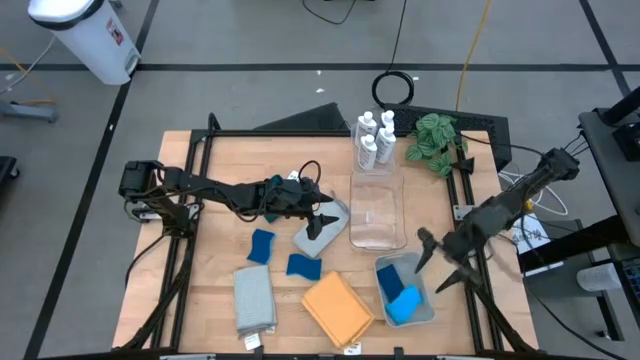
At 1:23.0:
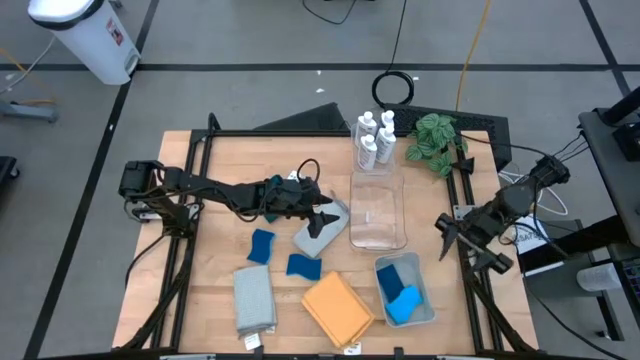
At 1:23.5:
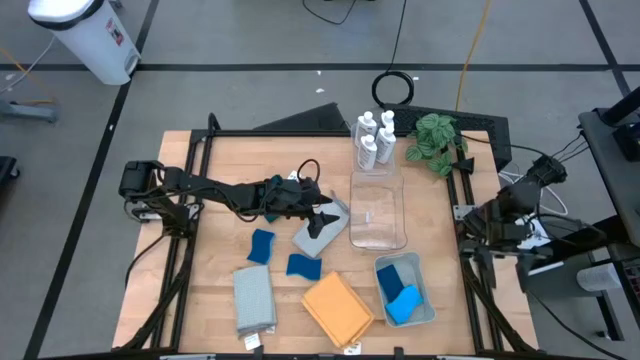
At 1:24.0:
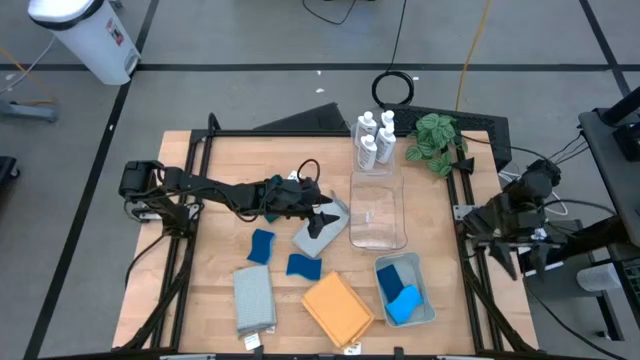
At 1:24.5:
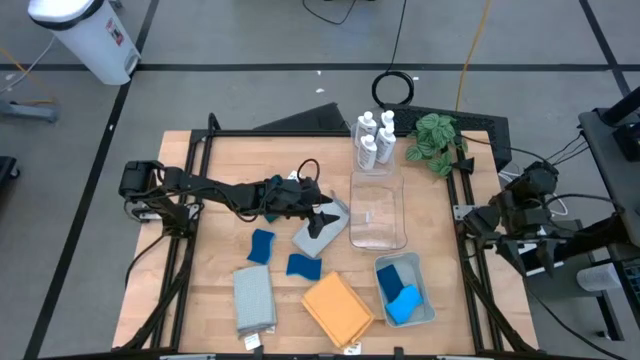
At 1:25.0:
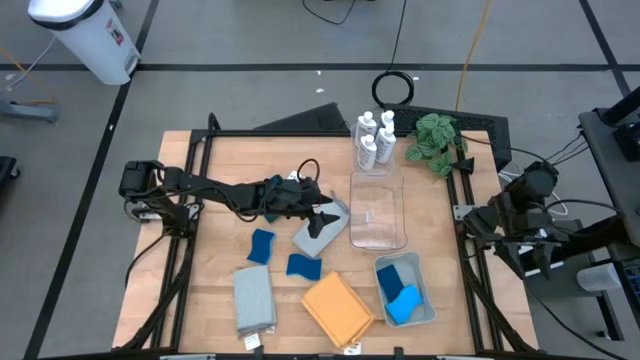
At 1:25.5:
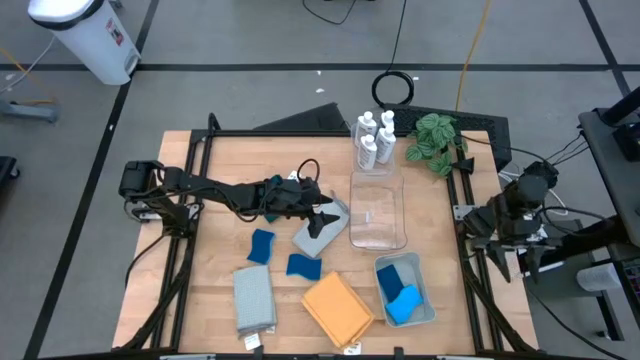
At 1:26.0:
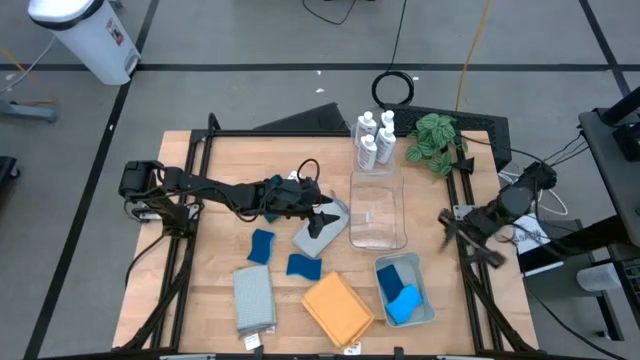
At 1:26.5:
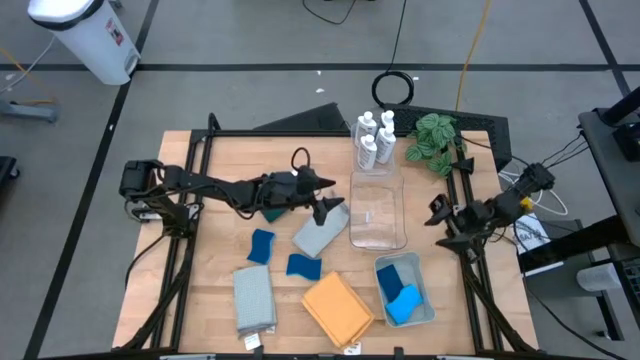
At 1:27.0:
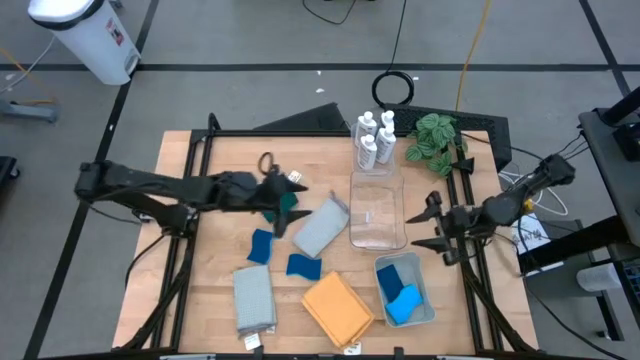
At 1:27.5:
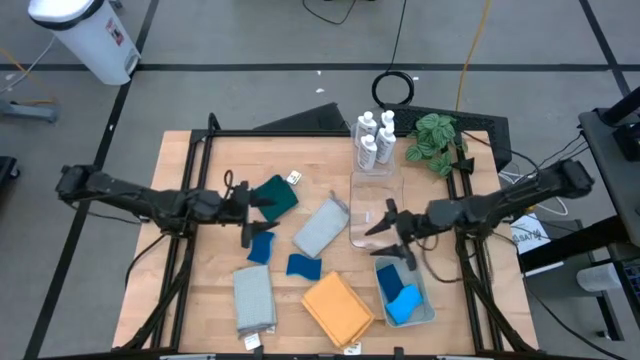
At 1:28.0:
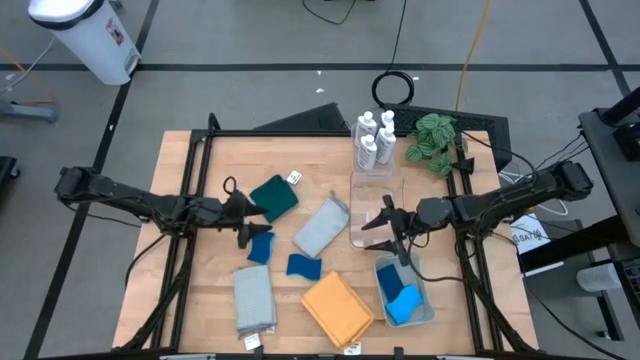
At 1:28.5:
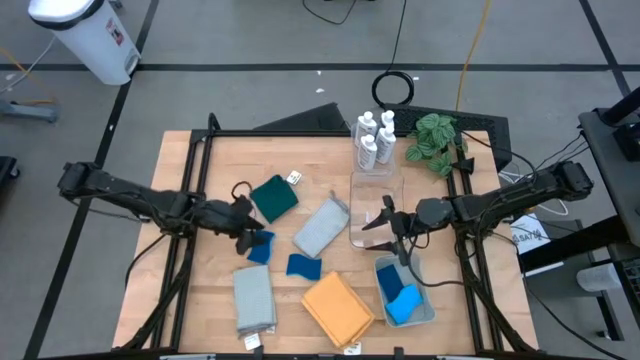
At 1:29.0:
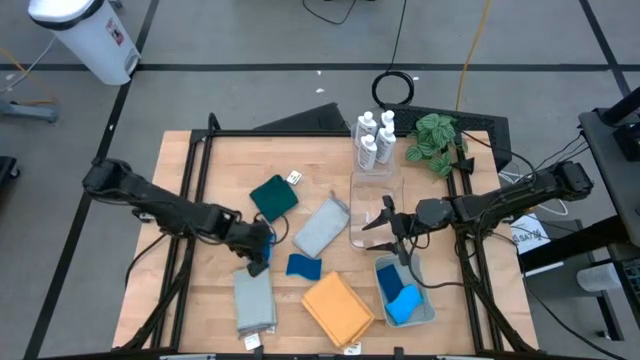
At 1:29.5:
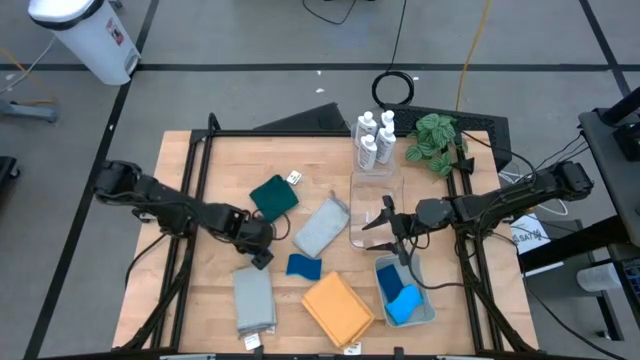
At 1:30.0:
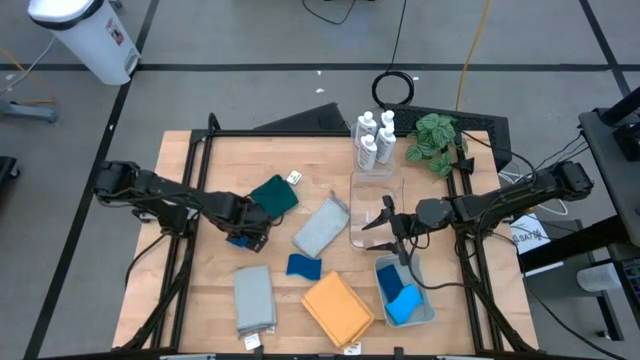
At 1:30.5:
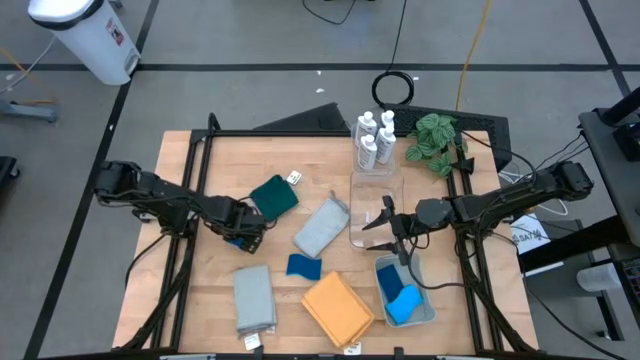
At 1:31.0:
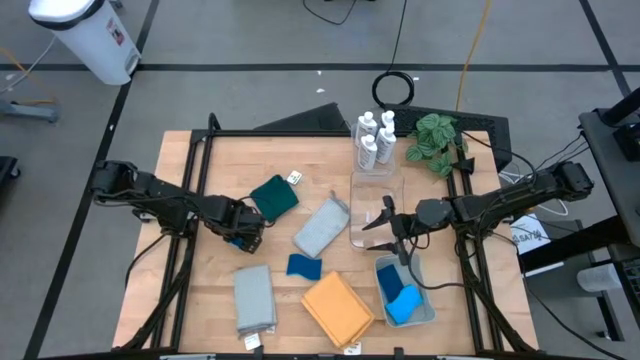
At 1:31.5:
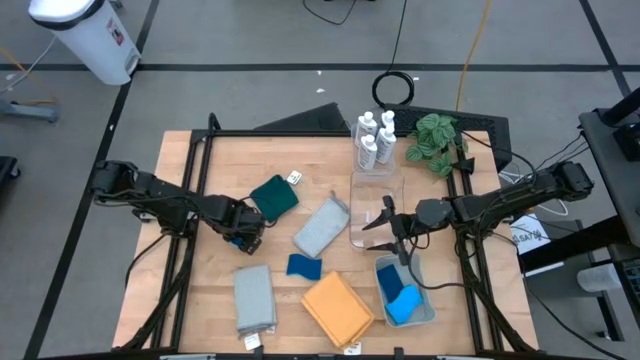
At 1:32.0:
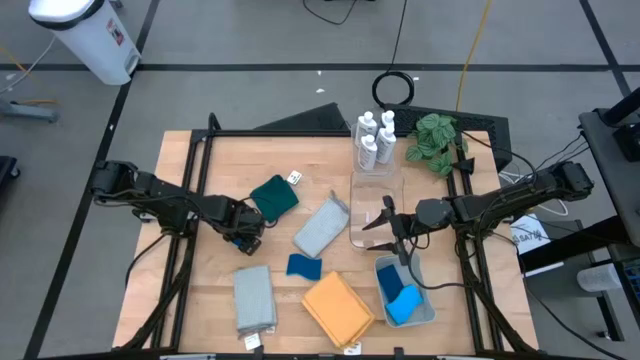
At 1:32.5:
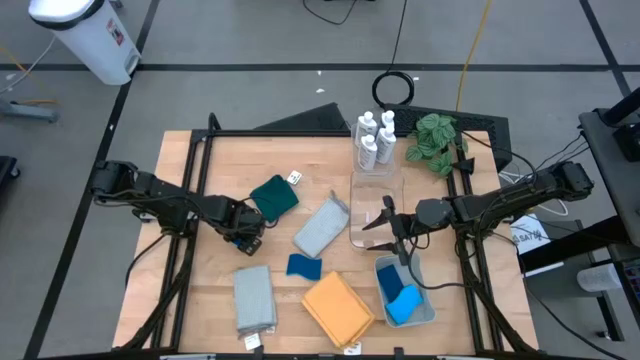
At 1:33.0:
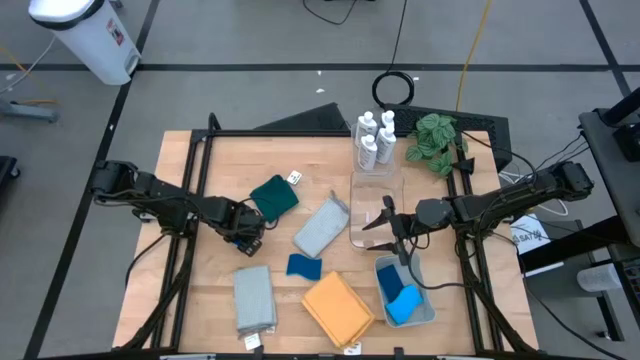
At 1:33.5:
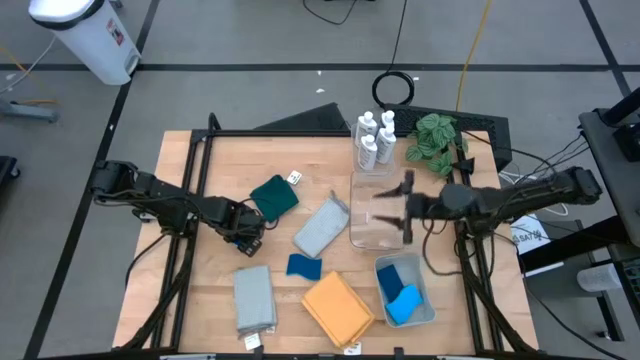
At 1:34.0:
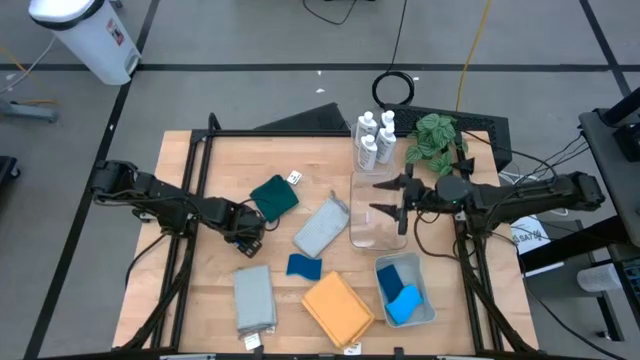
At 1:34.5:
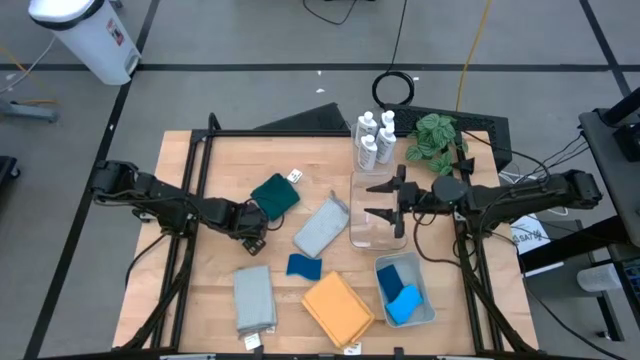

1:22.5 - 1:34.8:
Task: Pick & Place Kitchen Items
Put the blue sponge into the gray bin

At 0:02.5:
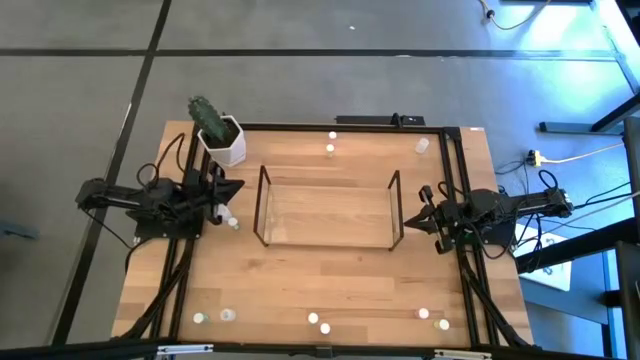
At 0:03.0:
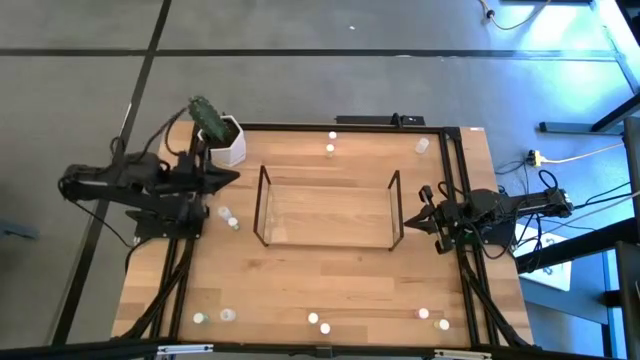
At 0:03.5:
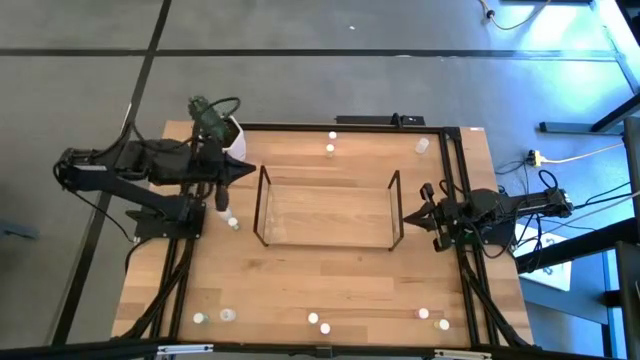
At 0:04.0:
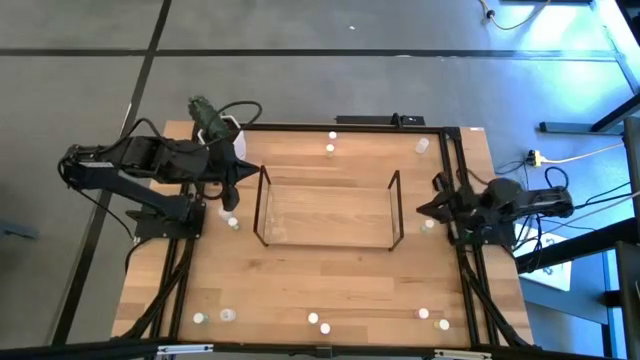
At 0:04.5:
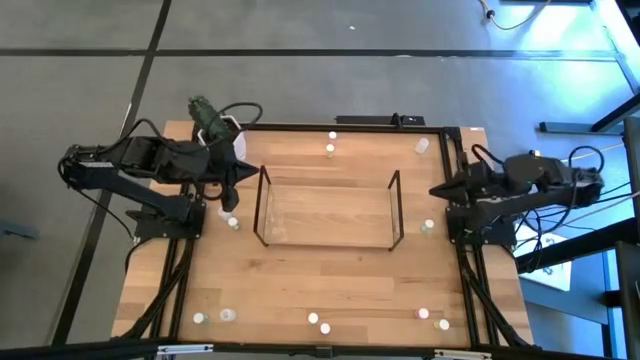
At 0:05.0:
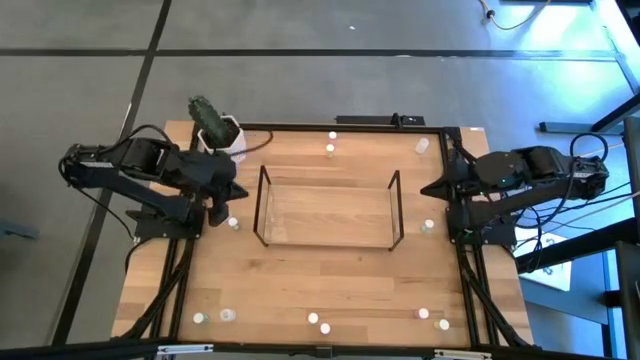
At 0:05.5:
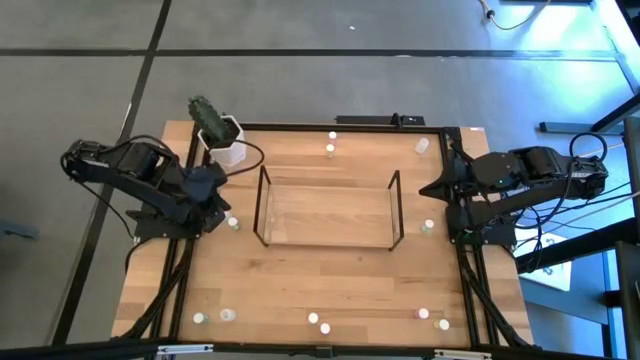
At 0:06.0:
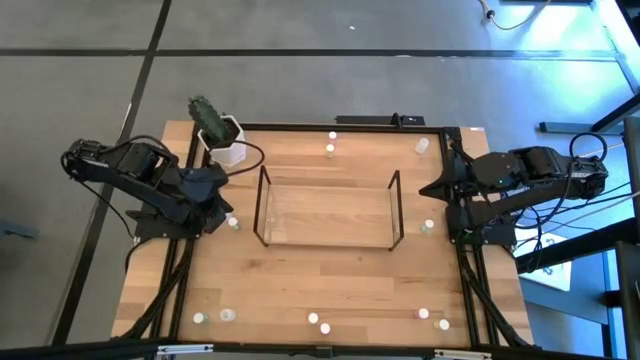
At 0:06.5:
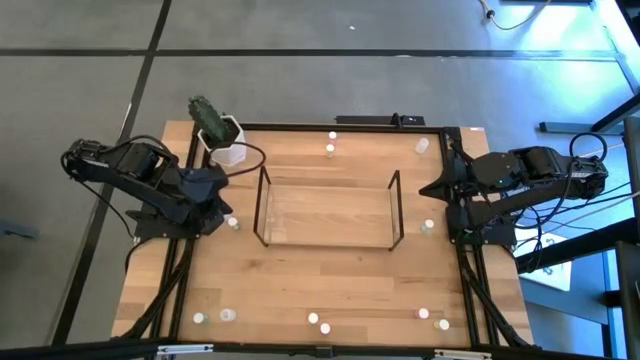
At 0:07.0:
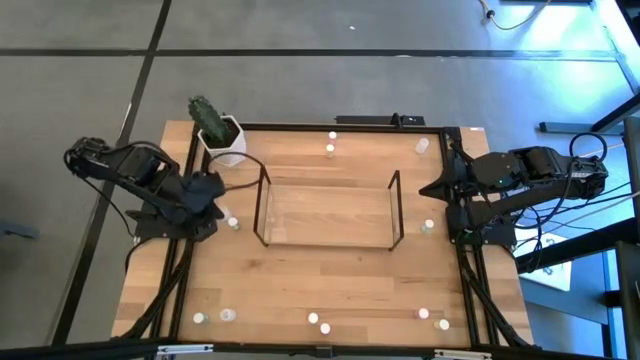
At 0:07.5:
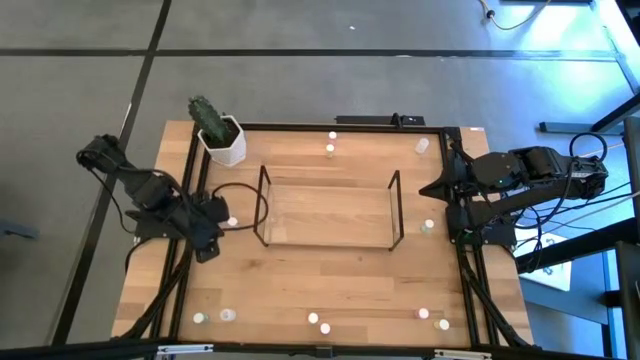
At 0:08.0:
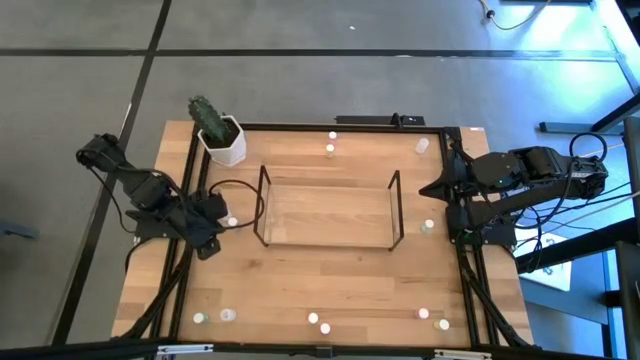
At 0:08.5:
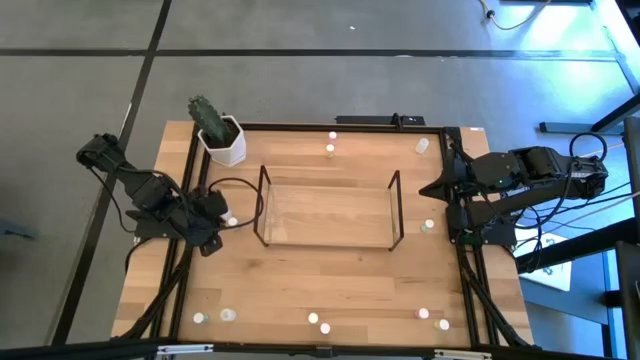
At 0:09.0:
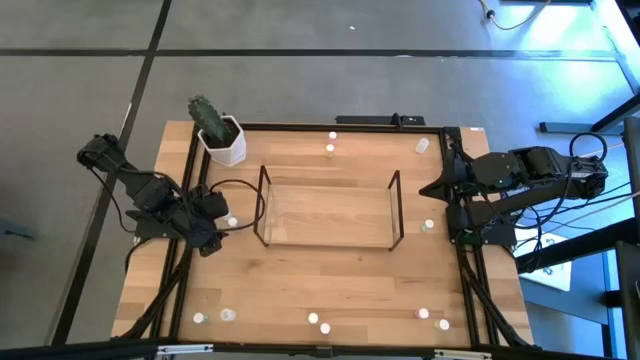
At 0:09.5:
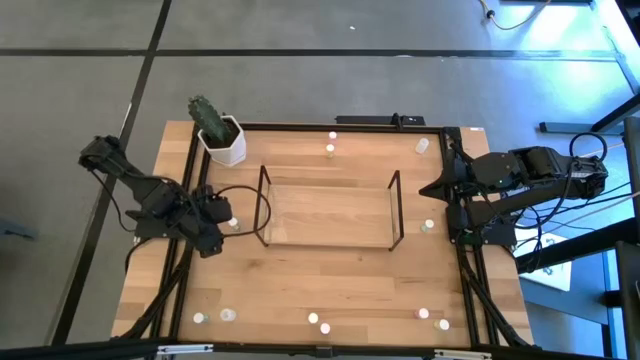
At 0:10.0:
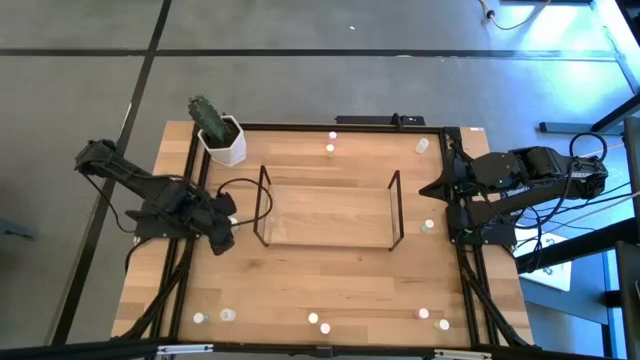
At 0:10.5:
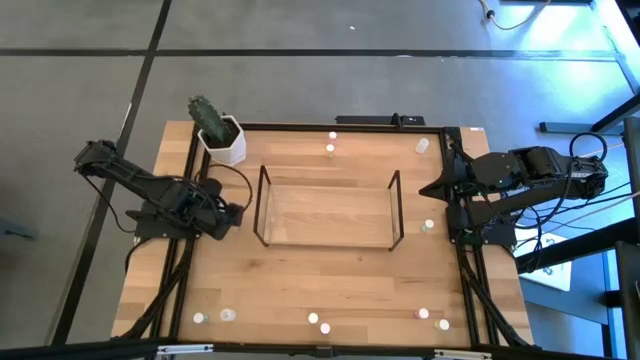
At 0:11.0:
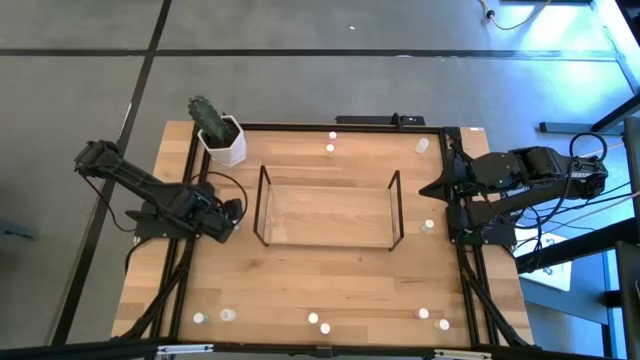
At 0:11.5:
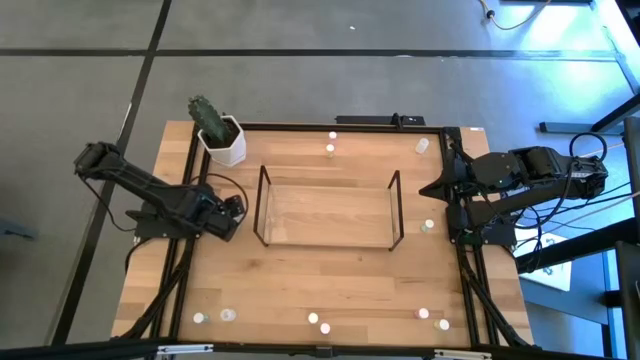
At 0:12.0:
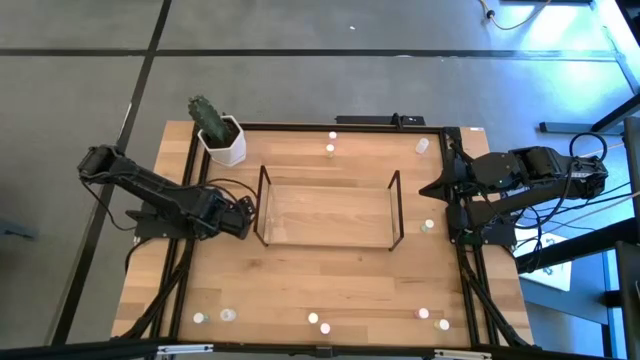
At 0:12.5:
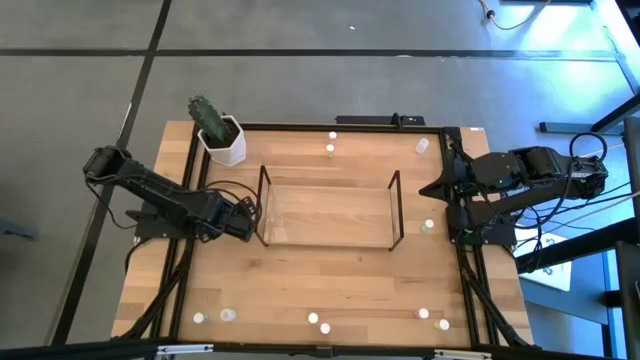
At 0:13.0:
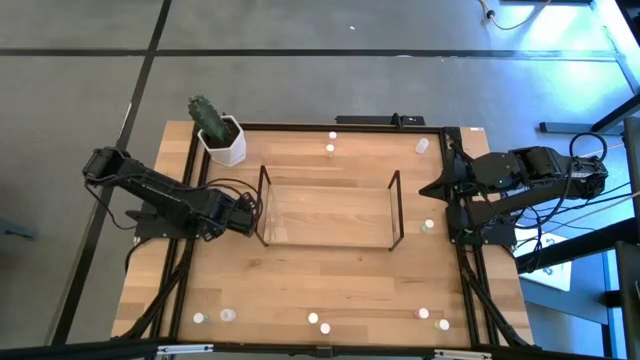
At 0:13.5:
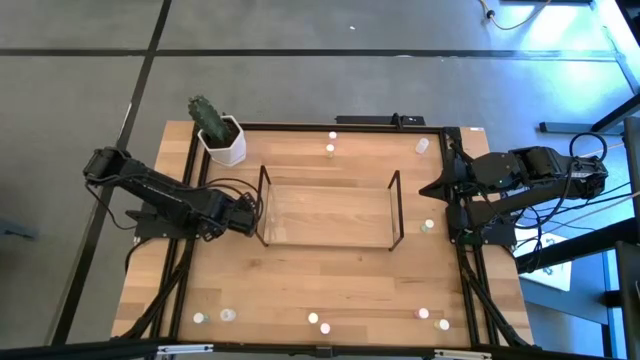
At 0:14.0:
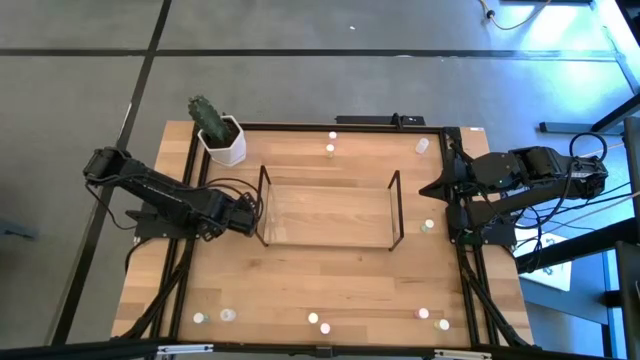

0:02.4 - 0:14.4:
Task: Pick and place medicine bottles onto shelf by color
Put the top left blue pill bottle on the shelf
